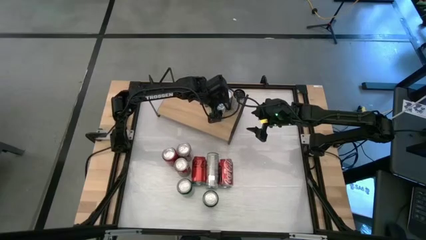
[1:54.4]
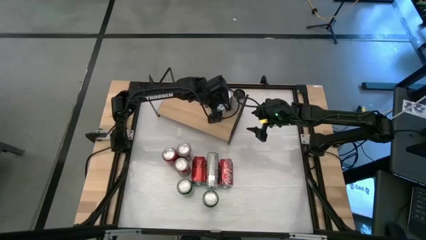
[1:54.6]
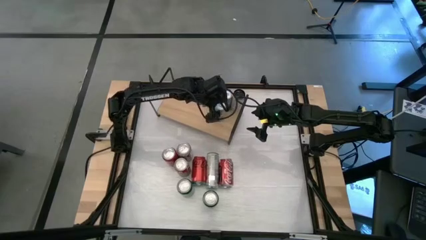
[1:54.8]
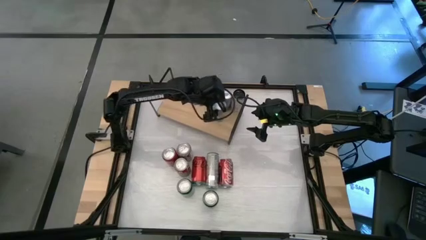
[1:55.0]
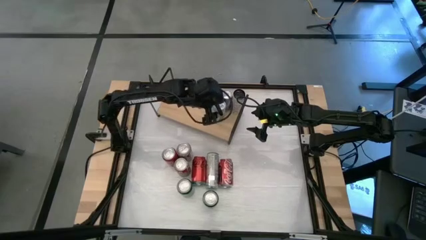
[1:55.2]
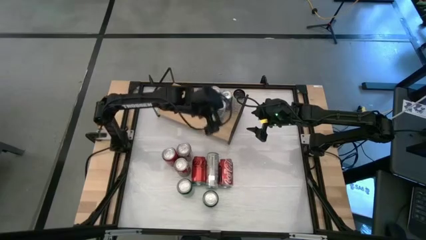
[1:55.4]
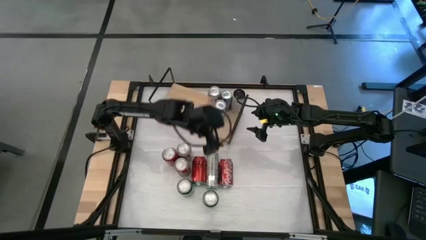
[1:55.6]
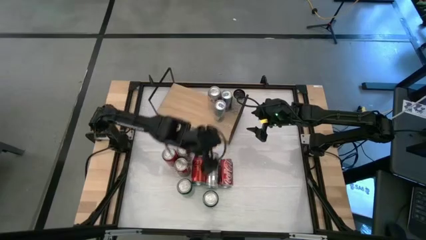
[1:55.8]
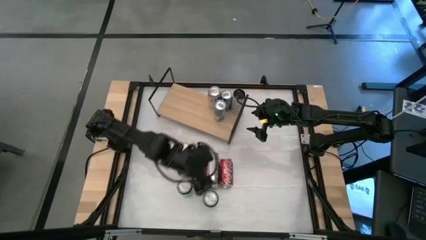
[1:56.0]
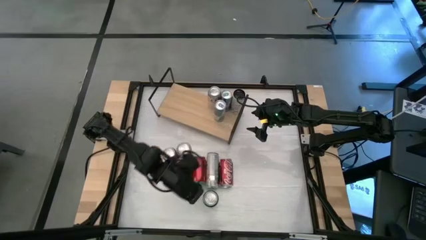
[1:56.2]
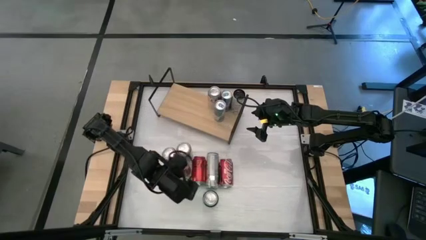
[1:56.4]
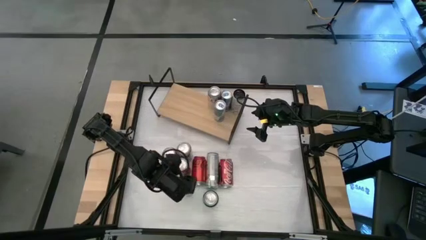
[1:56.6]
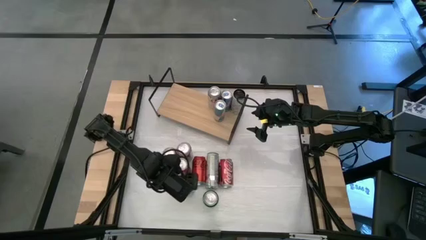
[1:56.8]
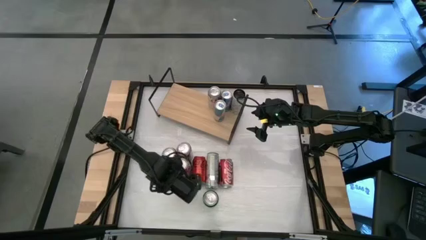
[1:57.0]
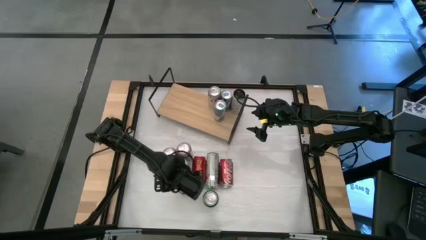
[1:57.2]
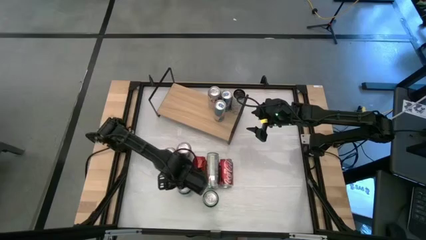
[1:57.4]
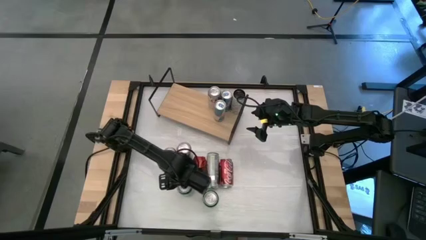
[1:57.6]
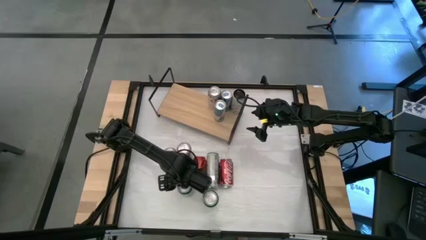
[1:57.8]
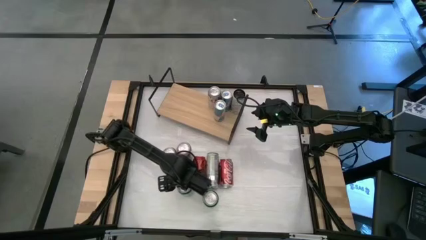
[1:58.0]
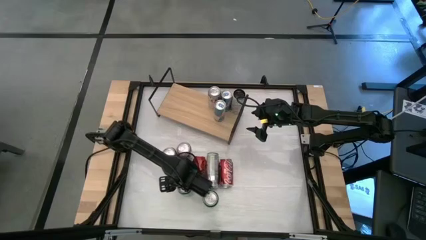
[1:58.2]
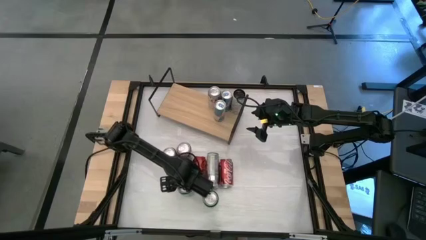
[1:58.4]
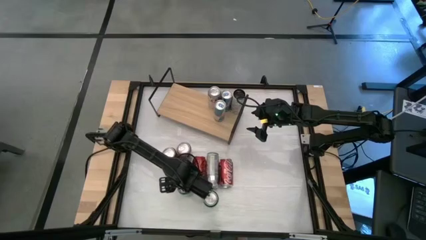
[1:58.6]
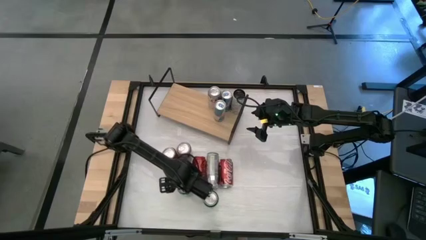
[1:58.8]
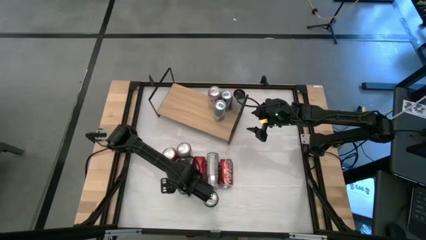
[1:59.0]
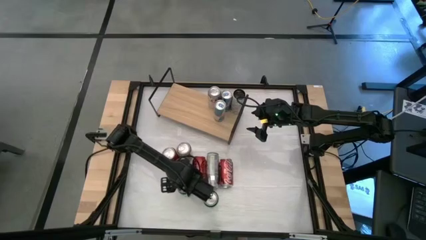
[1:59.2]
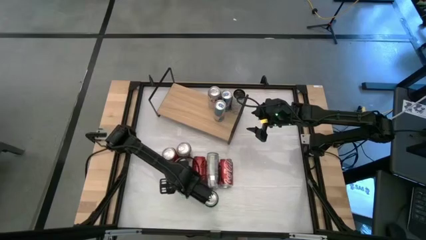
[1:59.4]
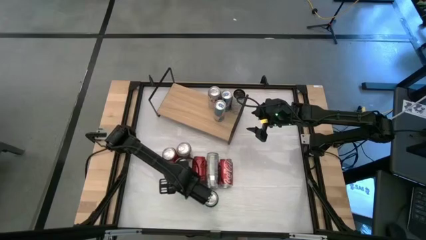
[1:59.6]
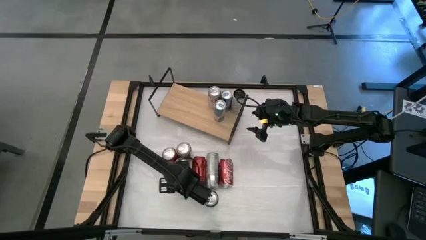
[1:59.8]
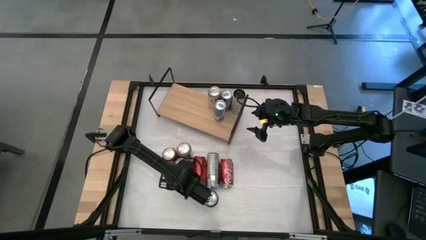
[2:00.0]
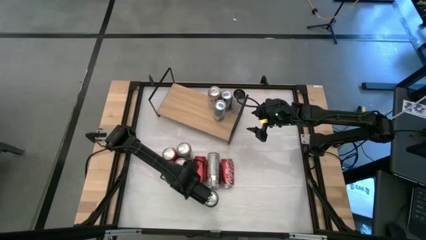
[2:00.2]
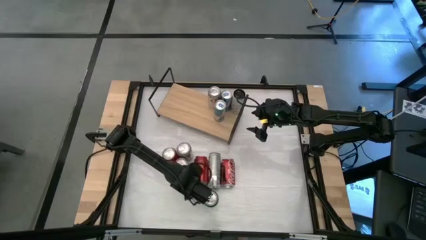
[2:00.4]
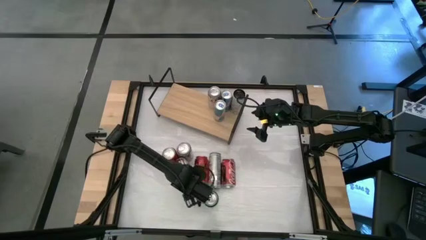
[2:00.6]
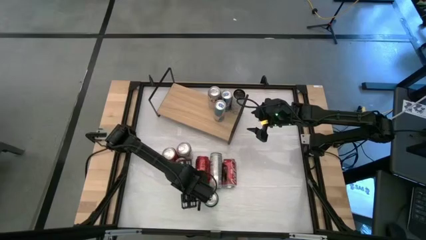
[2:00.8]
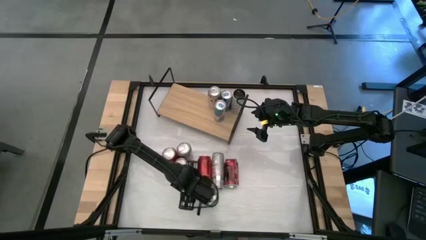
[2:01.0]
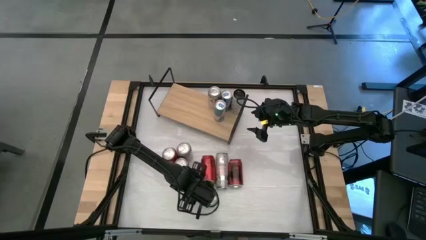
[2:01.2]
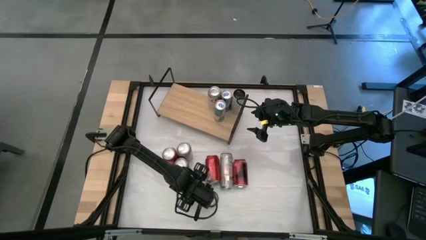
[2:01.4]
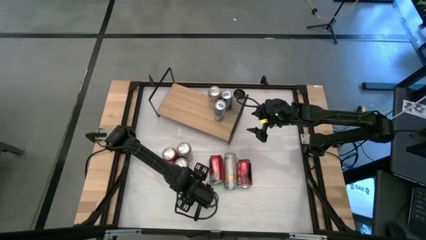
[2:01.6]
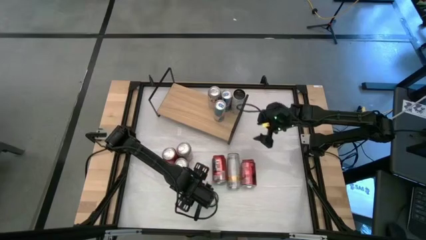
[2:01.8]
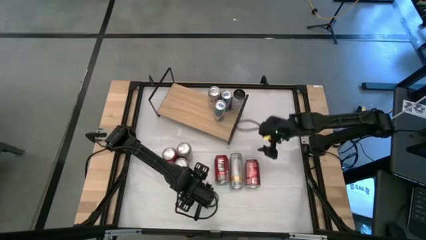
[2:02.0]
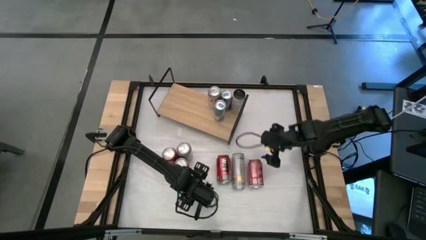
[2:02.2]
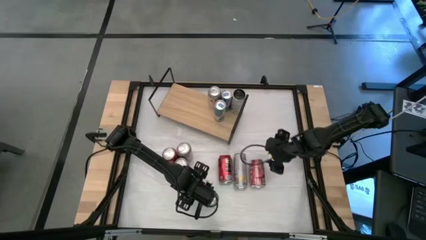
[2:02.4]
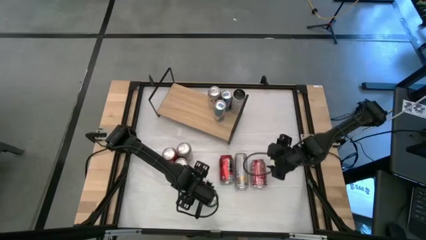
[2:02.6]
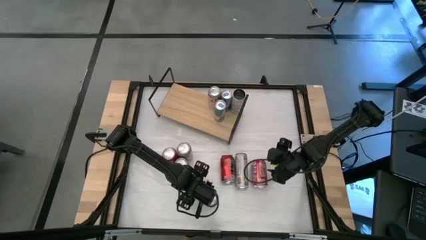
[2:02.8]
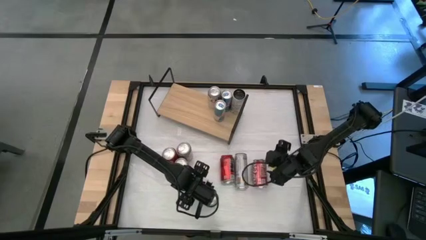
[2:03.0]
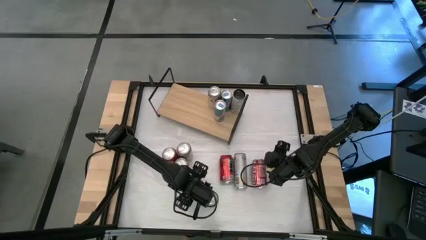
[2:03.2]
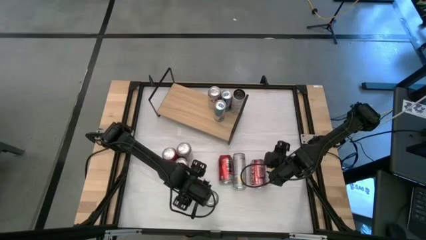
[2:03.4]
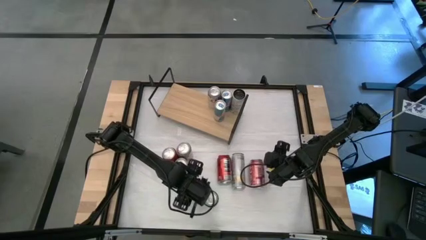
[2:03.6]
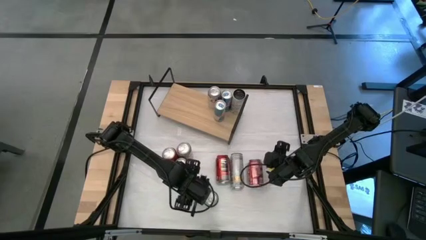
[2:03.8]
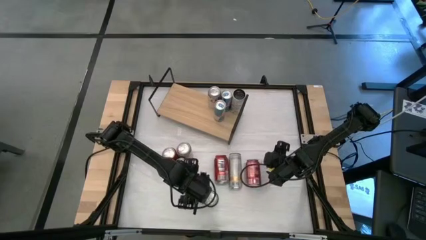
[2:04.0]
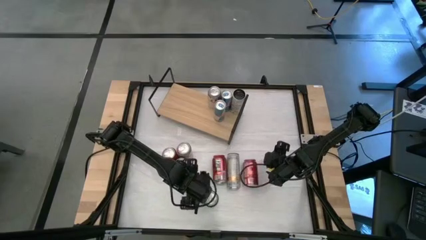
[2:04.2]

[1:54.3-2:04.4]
Task: Place canned beverage on shelf
Put the left green soda can on the shelf

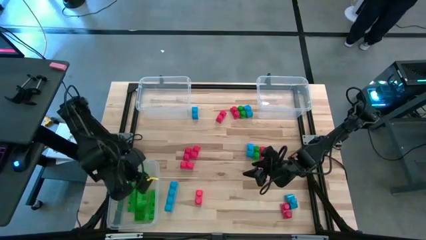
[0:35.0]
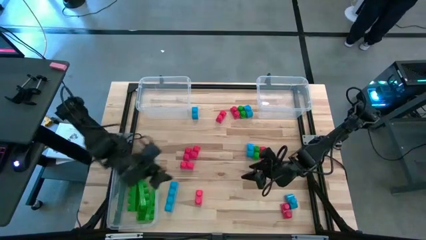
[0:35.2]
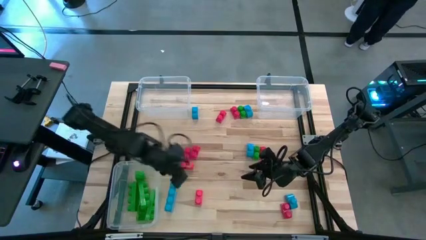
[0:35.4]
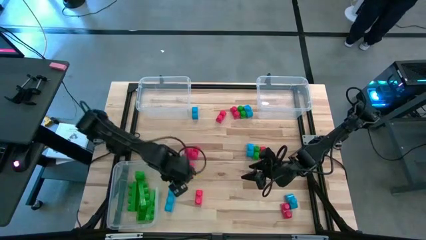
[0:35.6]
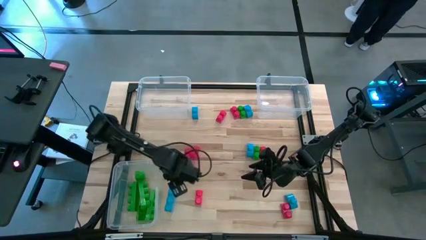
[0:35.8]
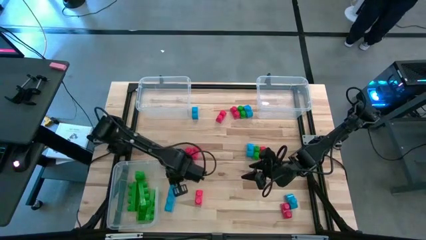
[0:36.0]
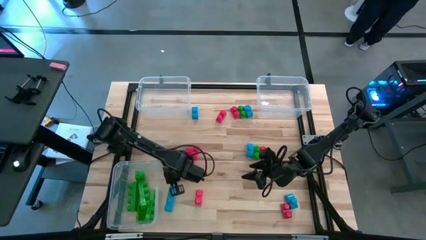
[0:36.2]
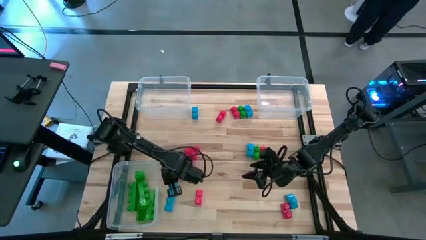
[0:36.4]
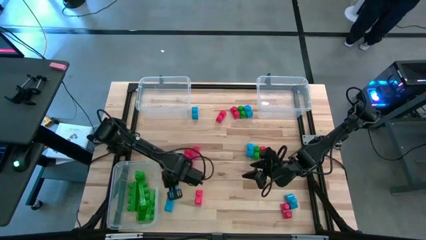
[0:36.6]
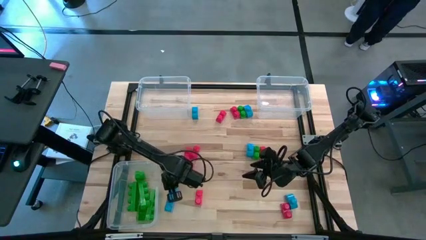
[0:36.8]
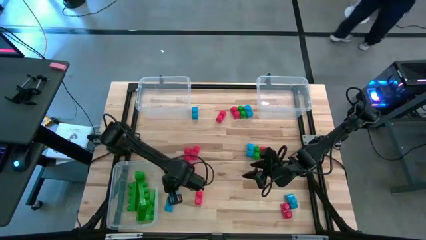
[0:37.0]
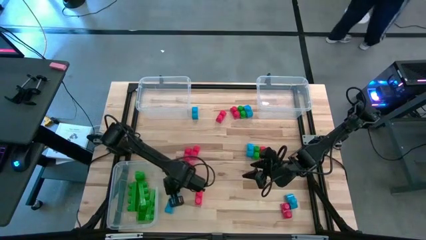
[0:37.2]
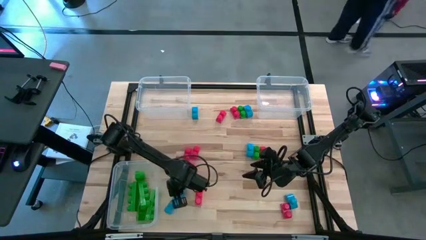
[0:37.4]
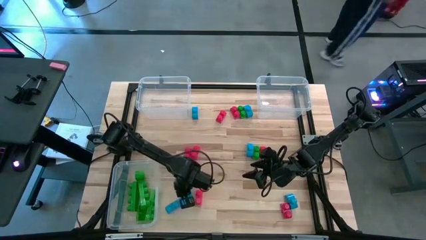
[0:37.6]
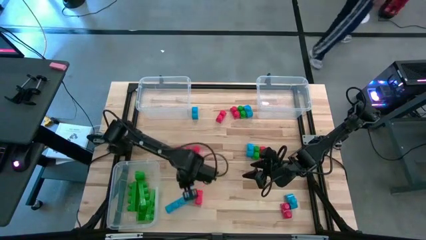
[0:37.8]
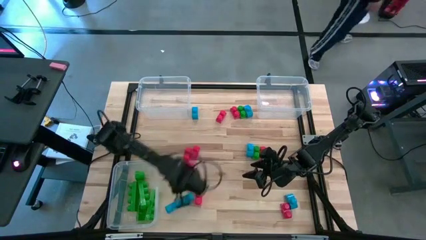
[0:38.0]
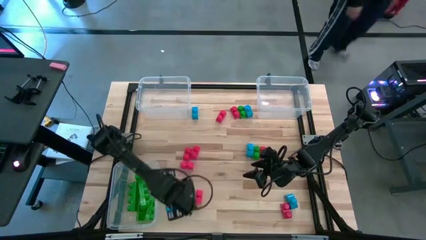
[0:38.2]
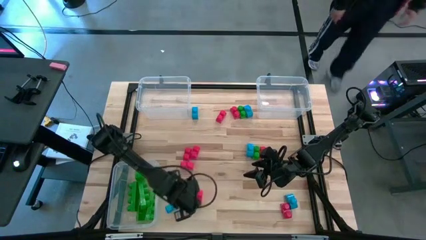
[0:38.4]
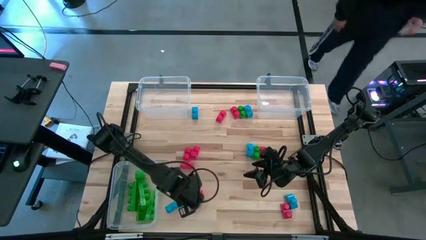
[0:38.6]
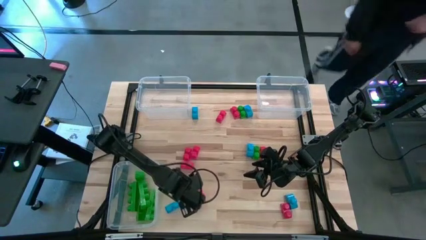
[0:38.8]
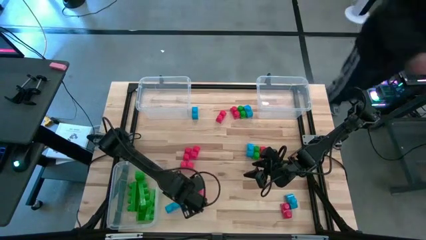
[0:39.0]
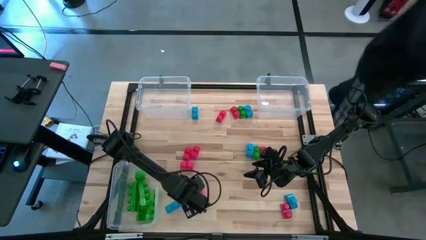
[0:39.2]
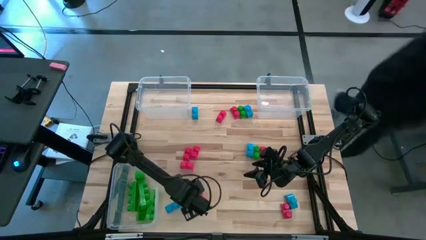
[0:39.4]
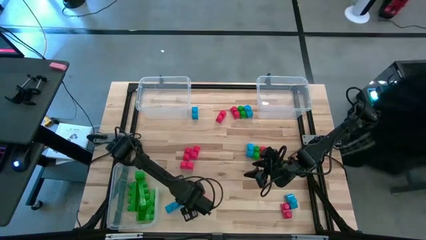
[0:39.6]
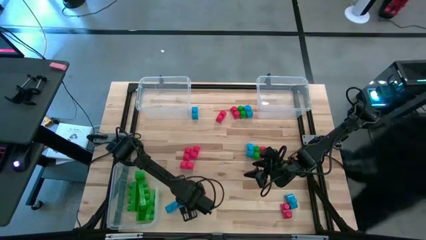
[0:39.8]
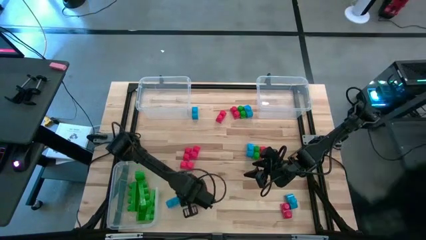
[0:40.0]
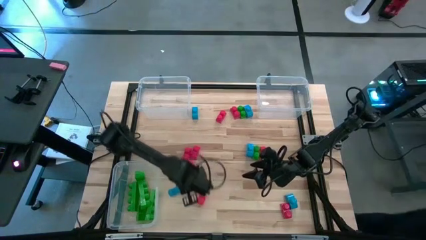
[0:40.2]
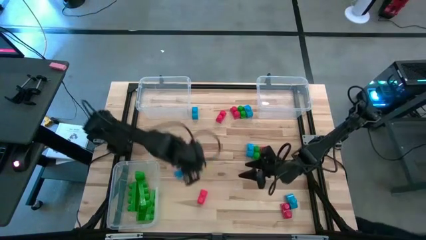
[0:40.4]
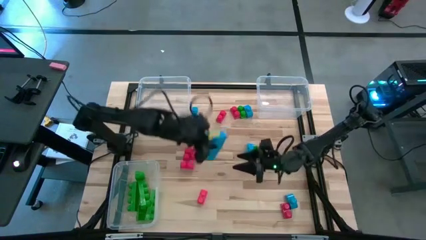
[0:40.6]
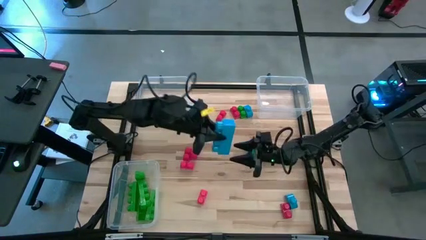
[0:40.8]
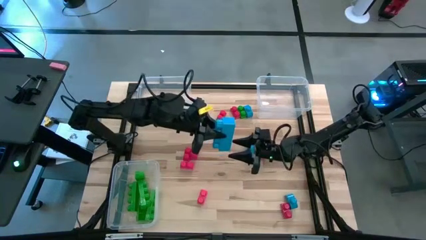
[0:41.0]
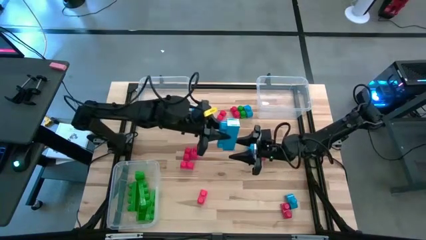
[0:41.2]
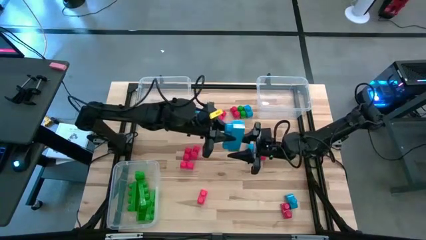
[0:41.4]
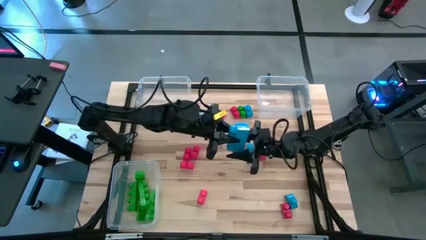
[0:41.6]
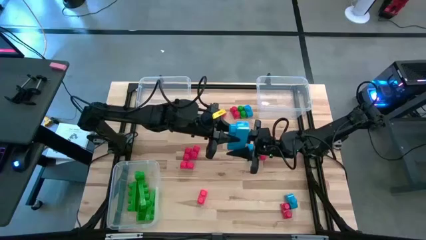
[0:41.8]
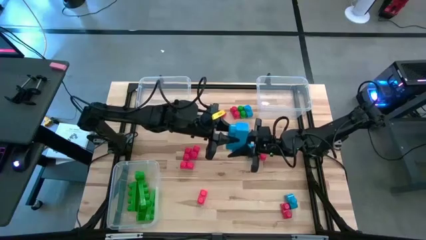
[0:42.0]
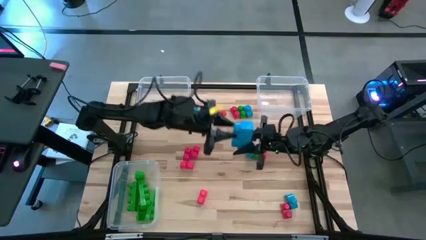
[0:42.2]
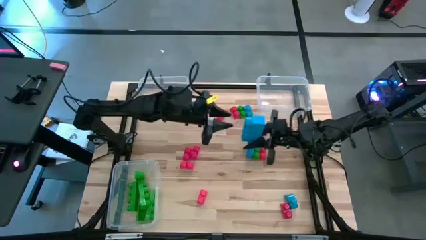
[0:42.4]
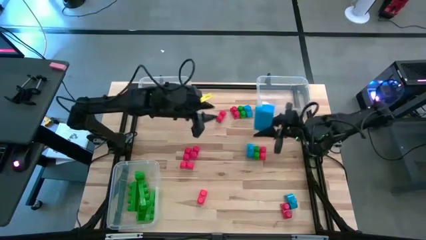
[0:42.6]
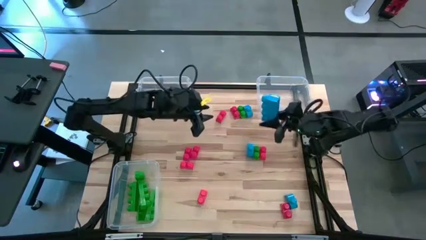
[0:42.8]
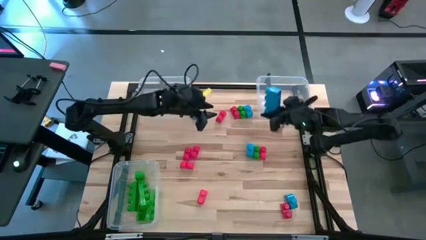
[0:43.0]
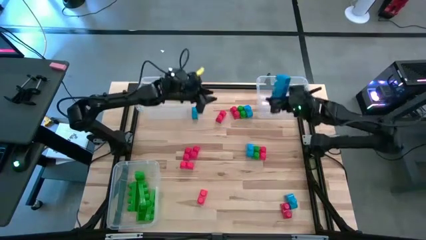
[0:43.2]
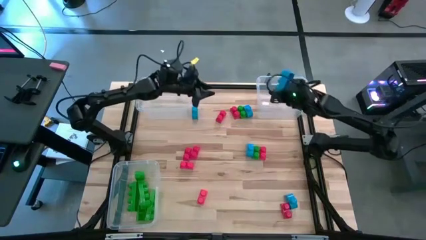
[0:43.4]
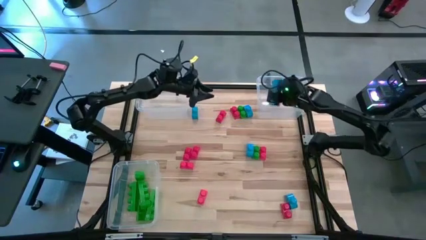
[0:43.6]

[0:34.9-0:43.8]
Task: Sort blocks
Put the blue game piece into the top right transparent bin
